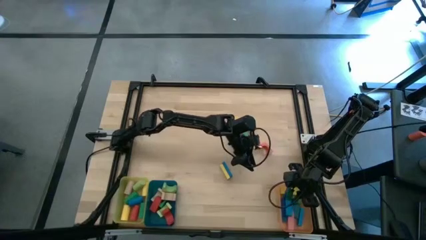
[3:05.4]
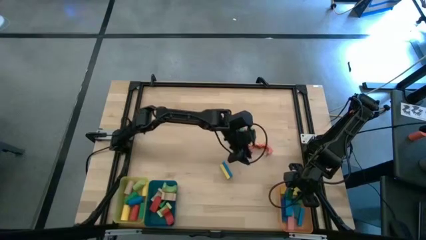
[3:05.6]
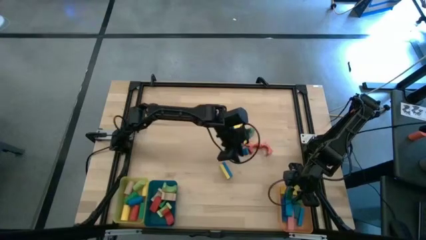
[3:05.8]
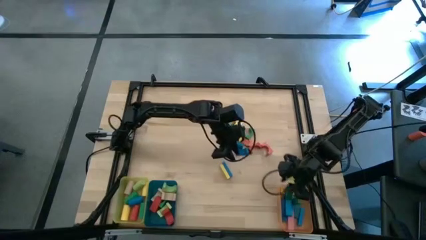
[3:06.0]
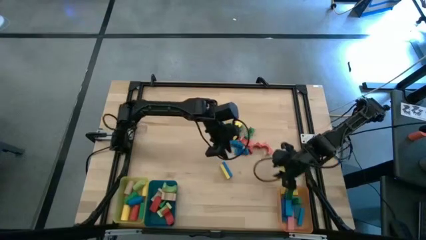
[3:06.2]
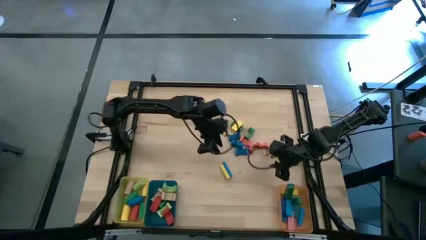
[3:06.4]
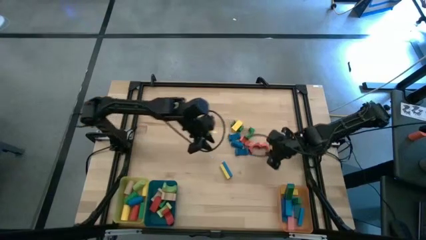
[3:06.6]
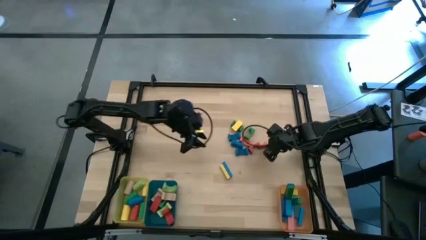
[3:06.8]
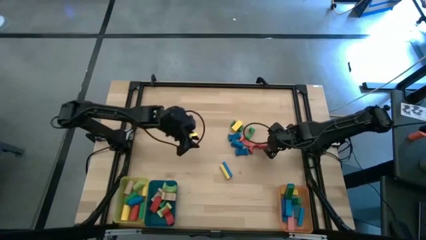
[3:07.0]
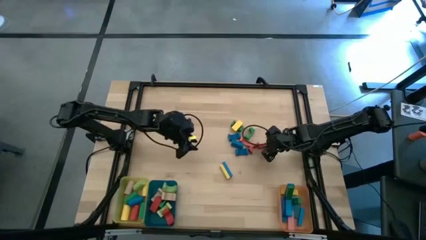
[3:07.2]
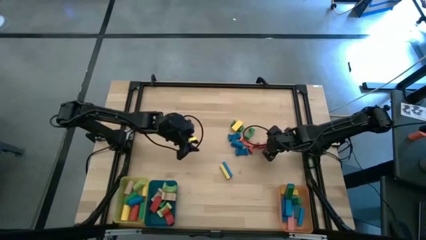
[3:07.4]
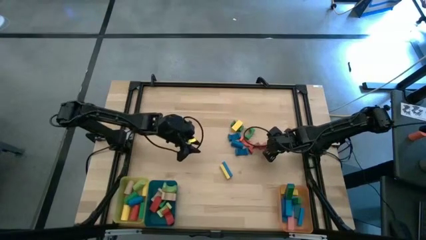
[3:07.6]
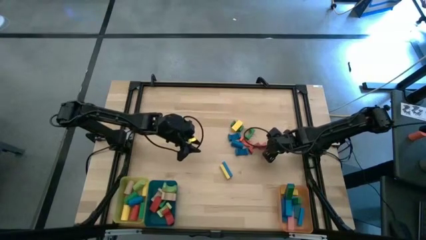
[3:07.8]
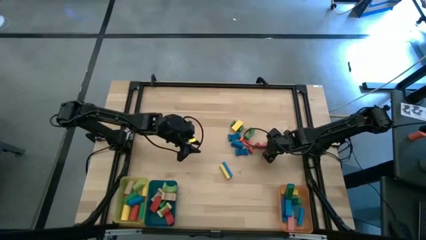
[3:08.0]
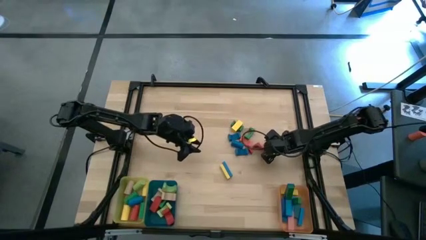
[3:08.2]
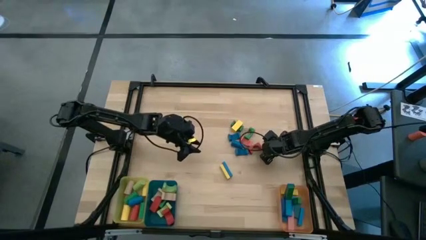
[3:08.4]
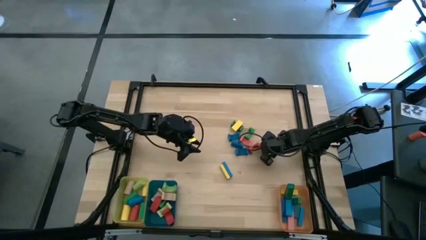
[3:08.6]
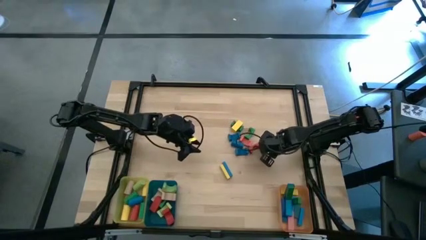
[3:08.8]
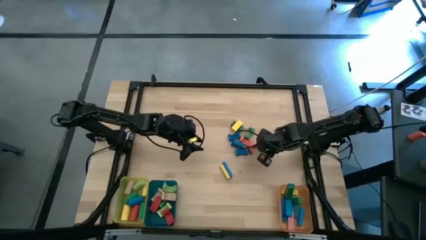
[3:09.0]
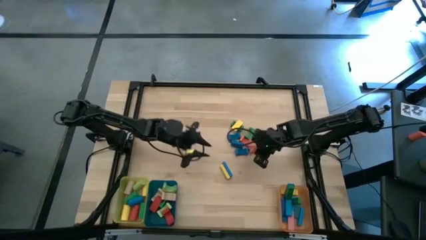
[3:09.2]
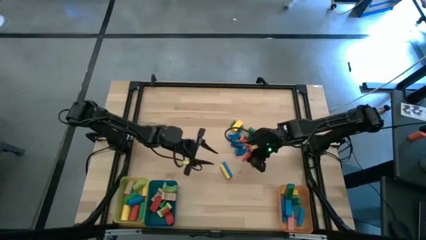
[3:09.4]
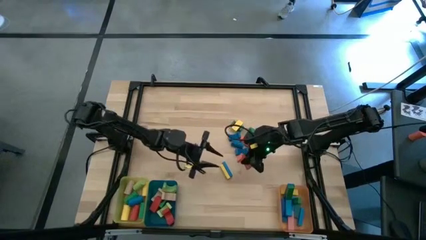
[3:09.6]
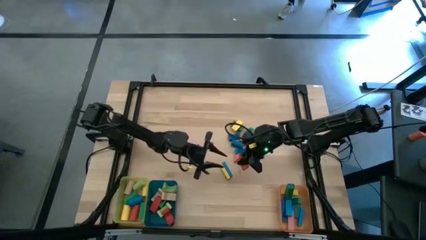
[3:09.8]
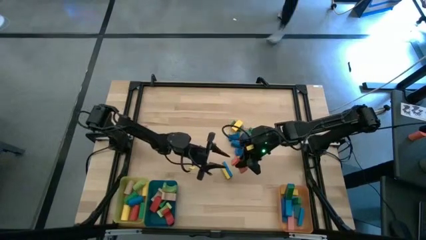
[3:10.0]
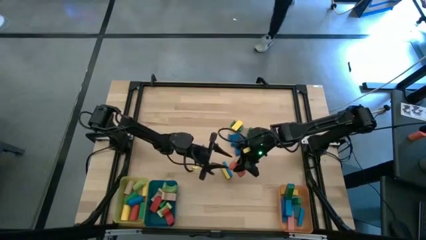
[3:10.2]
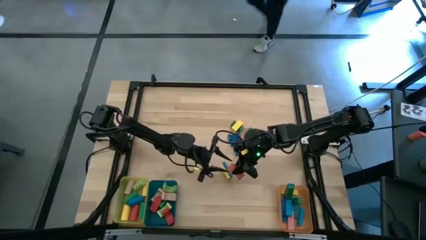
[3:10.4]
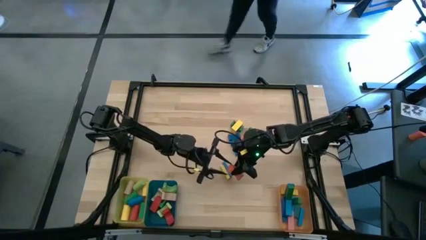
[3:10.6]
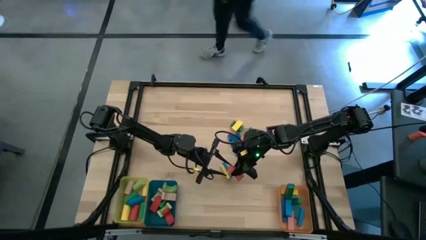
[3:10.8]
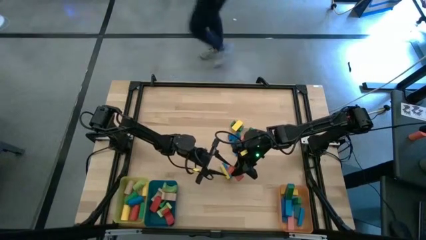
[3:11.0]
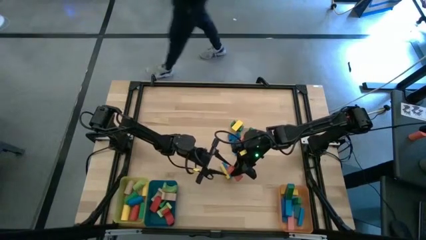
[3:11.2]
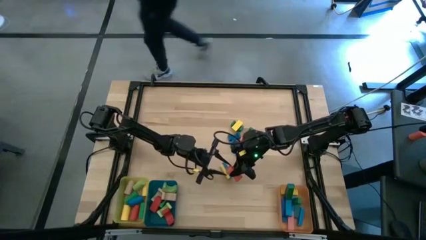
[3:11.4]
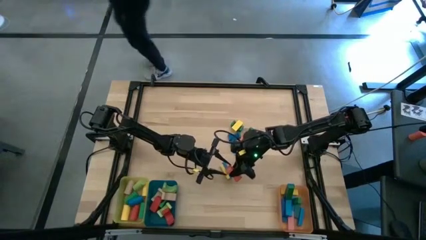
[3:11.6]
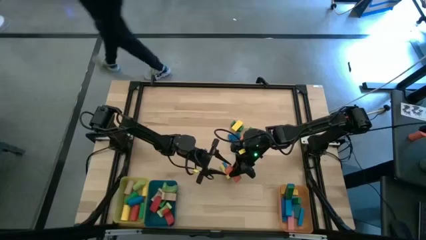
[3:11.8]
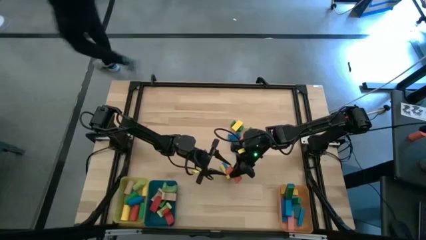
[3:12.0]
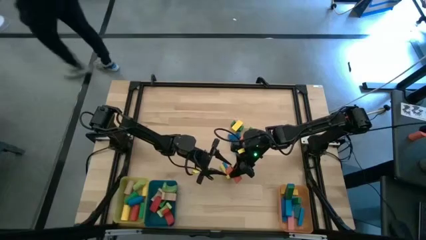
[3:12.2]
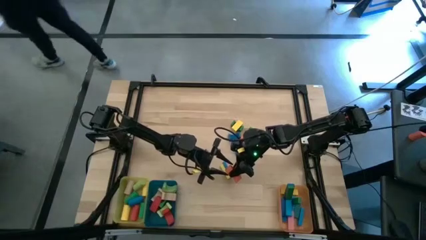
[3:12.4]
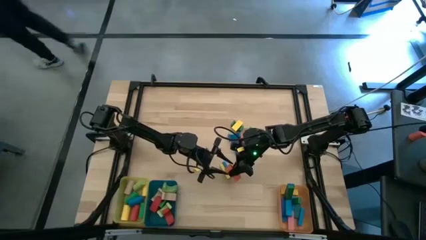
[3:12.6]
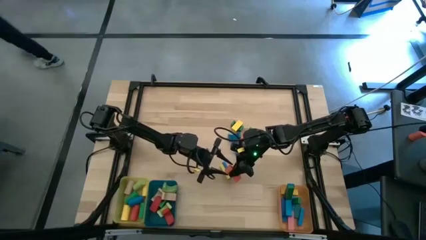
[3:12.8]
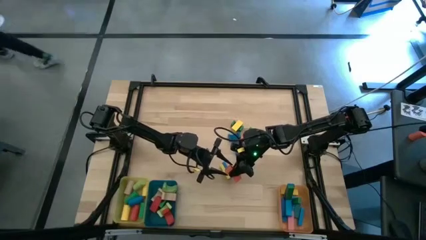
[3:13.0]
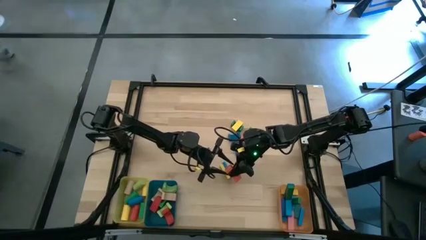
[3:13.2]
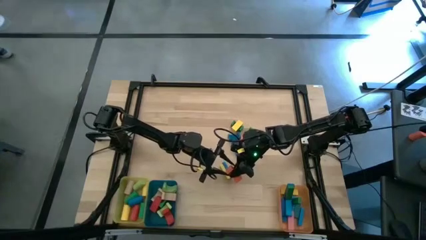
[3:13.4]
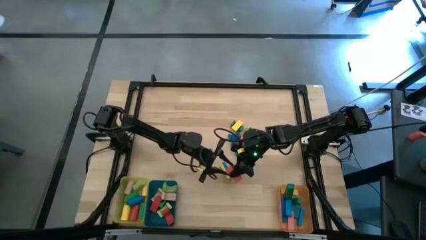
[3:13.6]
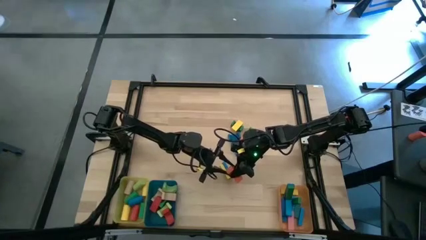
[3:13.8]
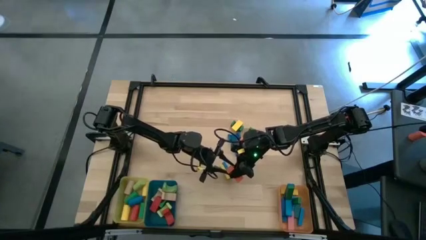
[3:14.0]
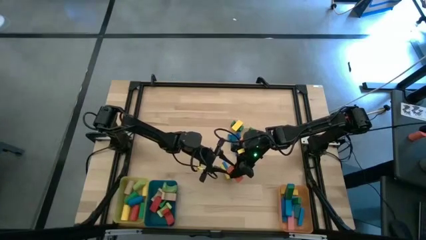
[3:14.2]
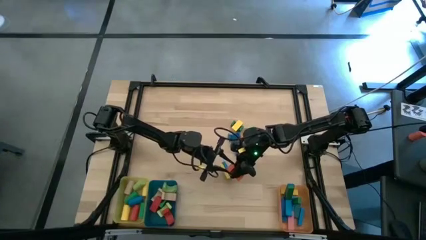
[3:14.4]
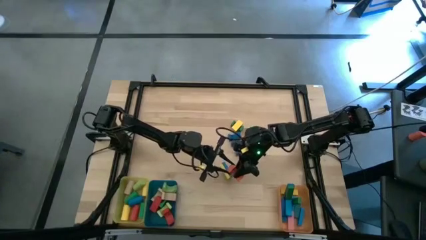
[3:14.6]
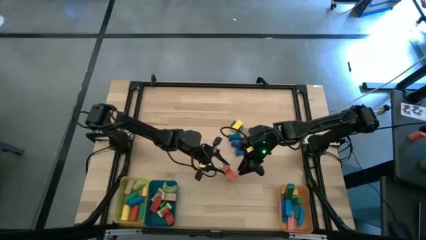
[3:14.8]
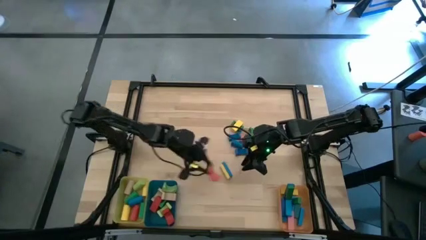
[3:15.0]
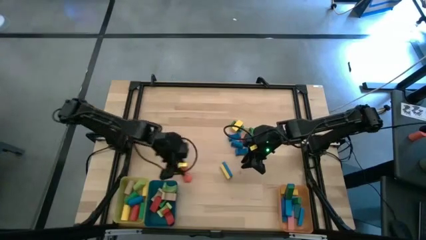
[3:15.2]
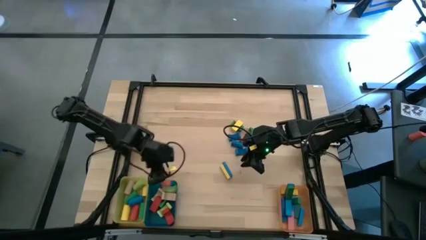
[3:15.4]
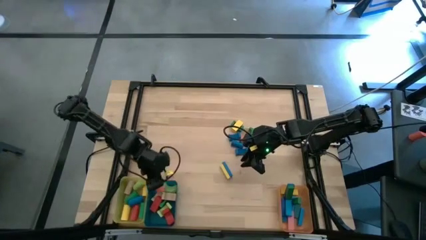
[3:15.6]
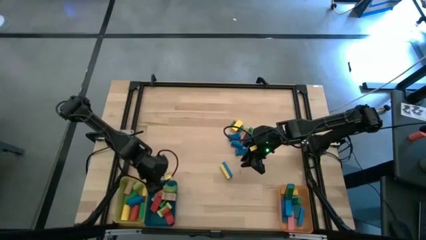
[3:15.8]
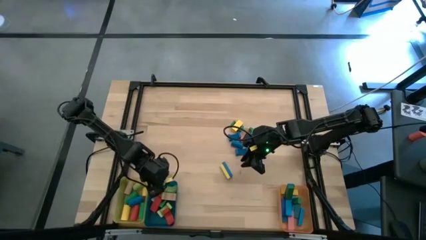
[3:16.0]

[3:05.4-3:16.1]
Task: Sort blocks by size
Put the orange arch block into the blue bin

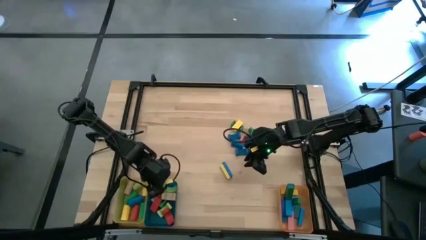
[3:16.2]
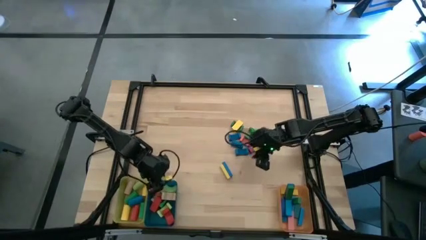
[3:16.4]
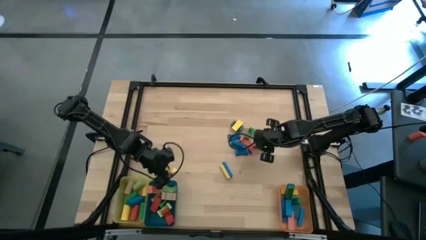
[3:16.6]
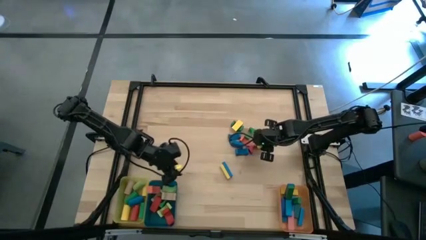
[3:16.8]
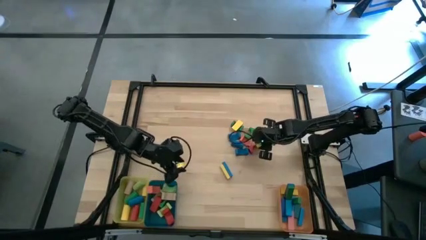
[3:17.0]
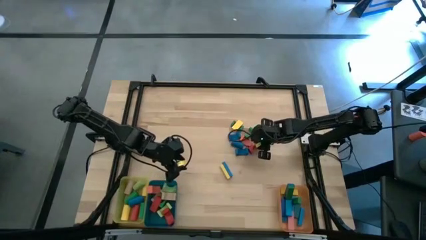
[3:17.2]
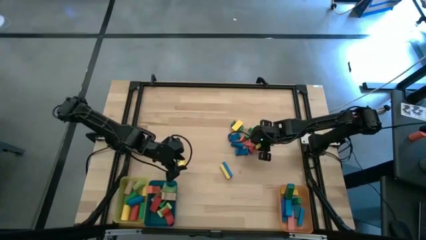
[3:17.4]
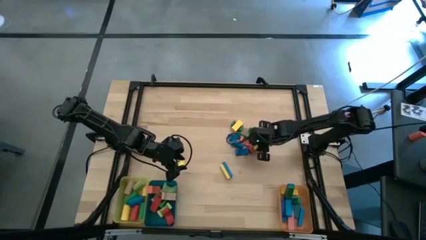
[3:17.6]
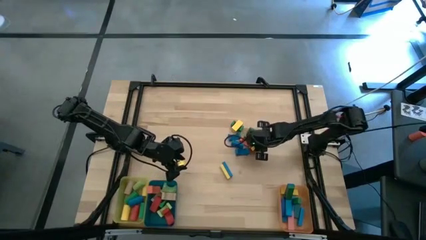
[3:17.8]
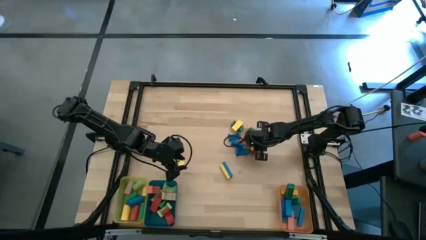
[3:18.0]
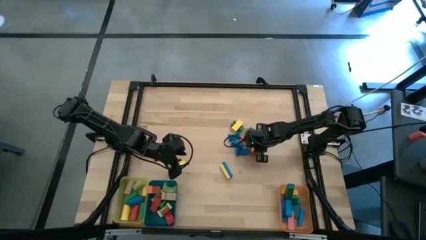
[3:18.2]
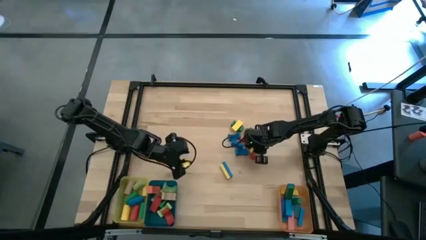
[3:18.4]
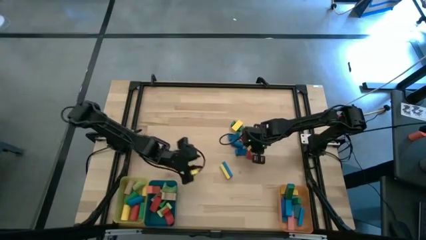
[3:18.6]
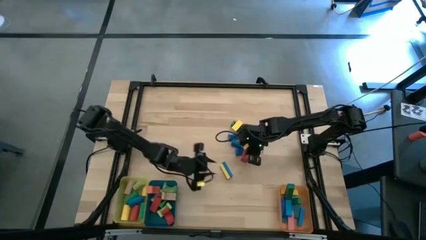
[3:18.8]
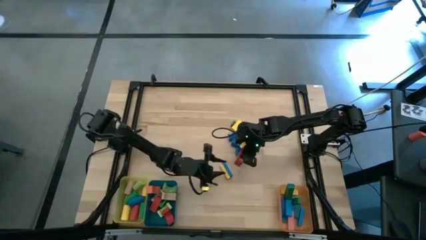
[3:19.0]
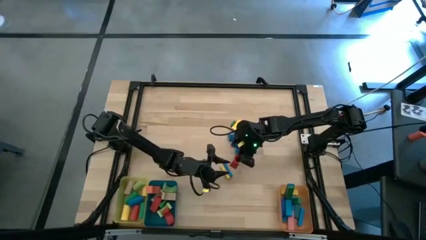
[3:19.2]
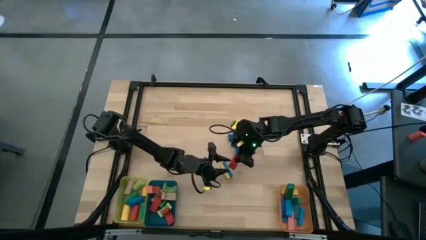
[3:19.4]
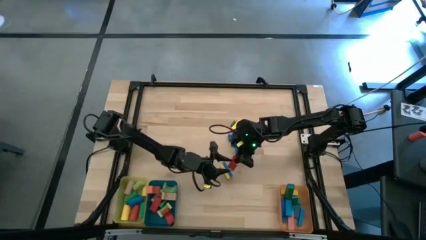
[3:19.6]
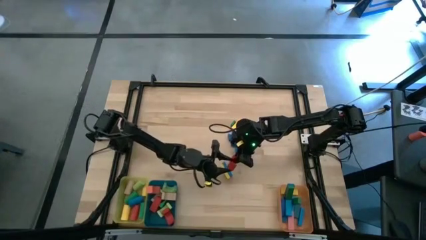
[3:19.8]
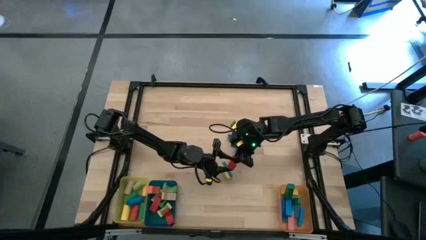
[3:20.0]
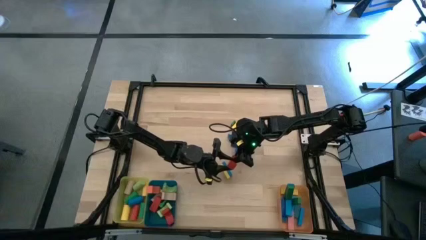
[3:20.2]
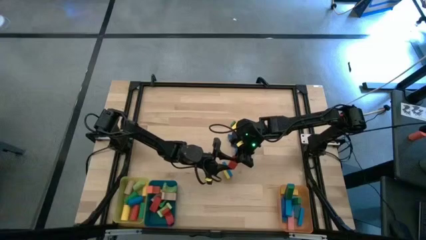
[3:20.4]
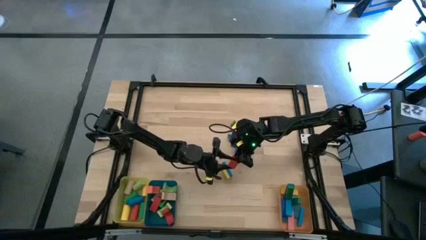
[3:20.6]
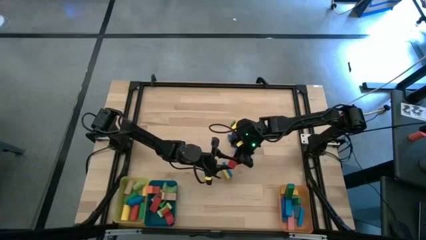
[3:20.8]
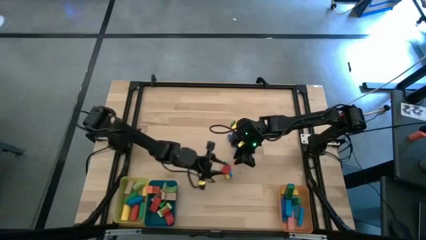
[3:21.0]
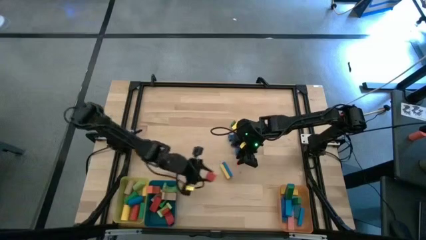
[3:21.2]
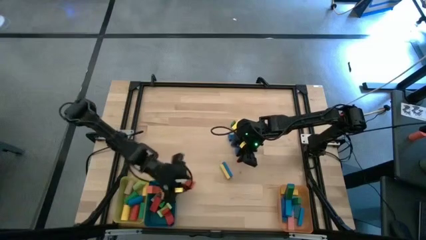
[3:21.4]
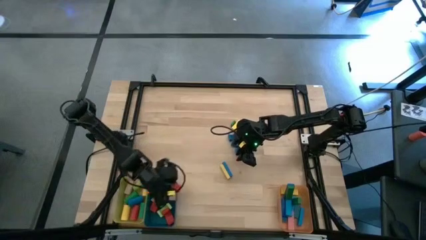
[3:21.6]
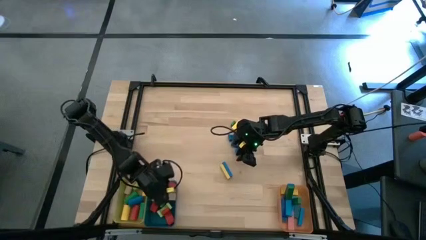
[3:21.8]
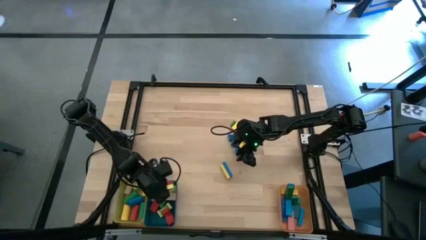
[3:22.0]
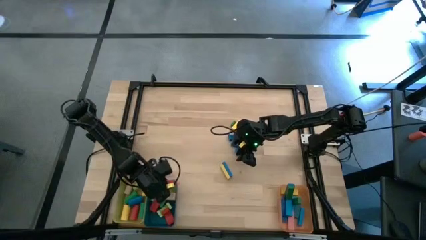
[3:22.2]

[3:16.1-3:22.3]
Put the red arch block into the blue bin

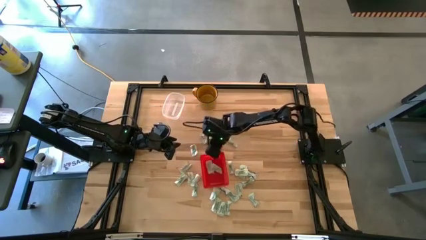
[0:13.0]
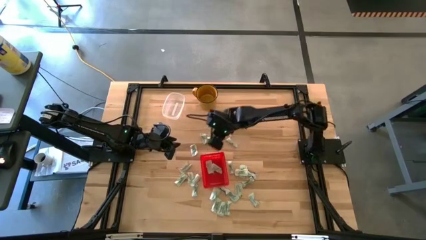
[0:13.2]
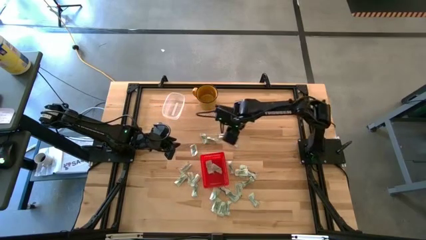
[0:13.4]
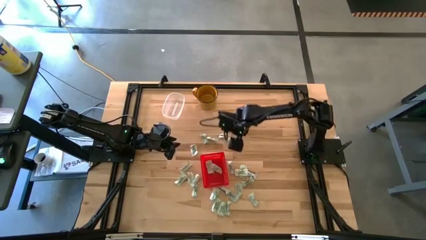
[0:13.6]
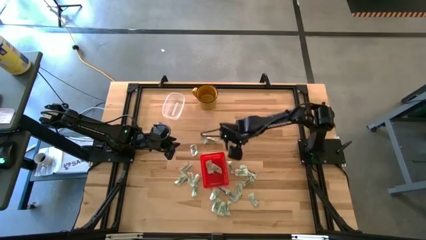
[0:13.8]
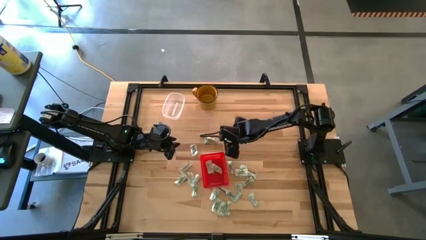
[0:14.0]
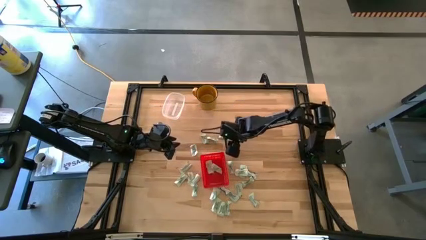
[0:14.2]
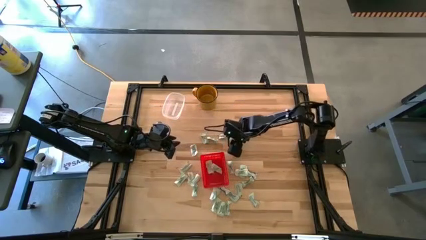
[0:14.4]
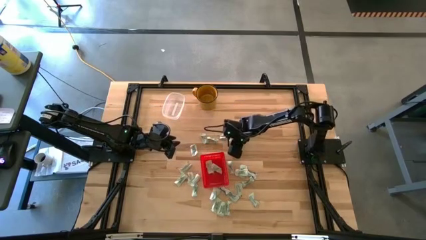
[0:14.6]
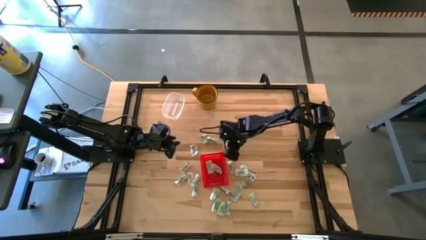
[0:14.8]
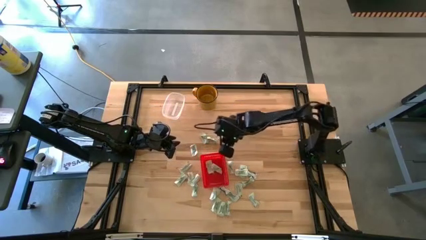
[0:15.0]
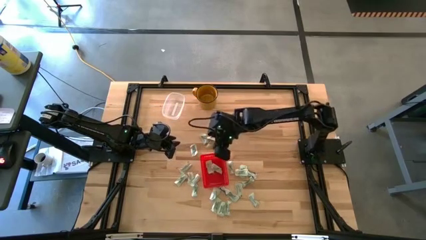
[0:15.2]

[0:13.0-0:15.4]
Task: Pick and place Stevia / Truvia into bins
Put the white stevia packet into the red basket
